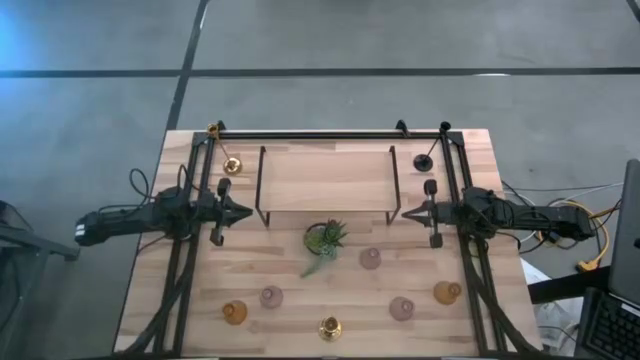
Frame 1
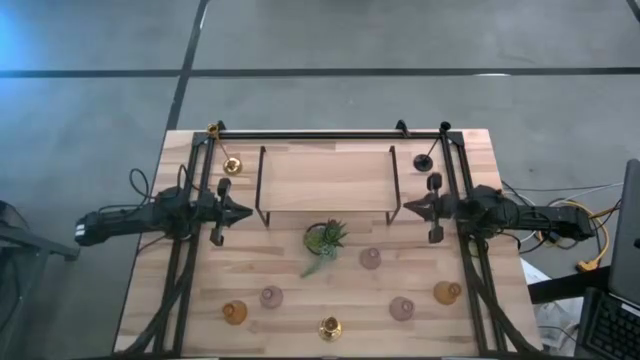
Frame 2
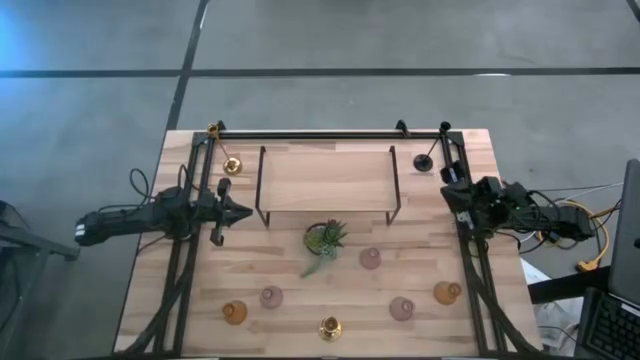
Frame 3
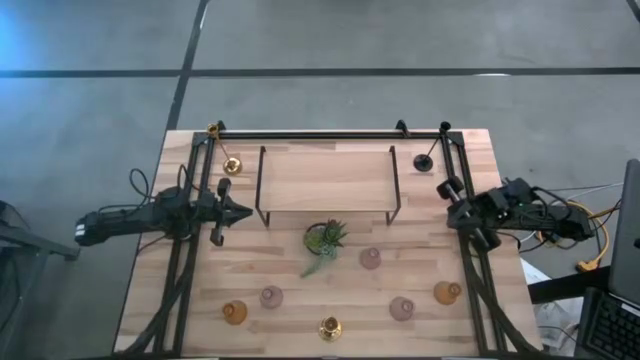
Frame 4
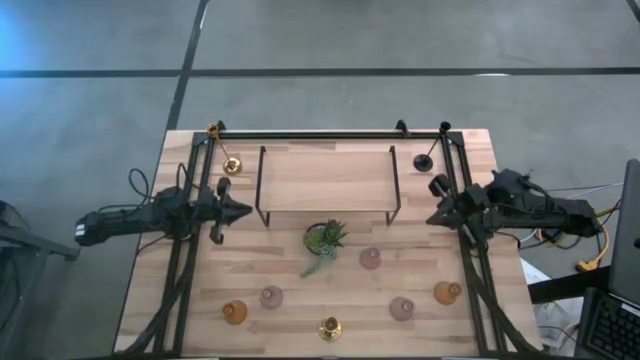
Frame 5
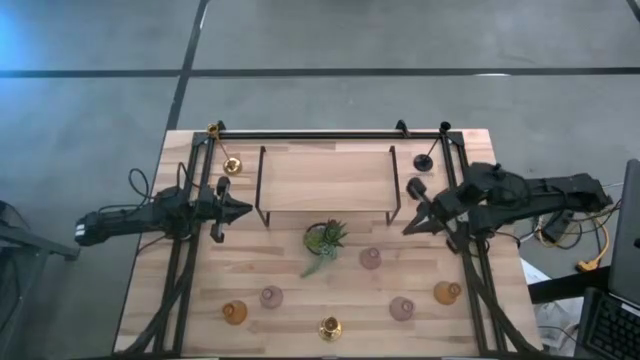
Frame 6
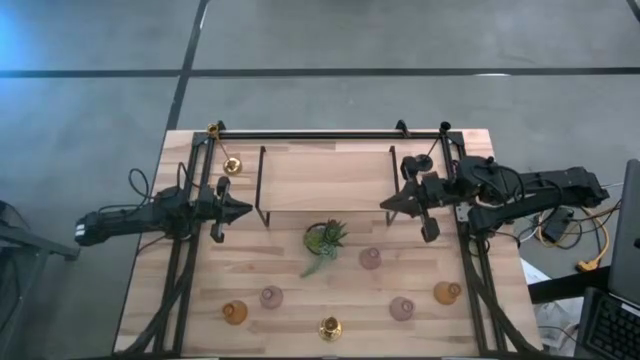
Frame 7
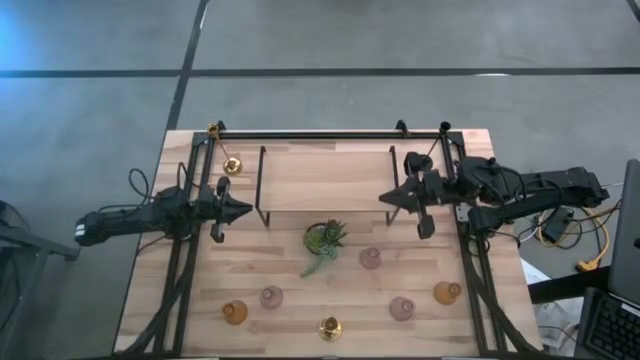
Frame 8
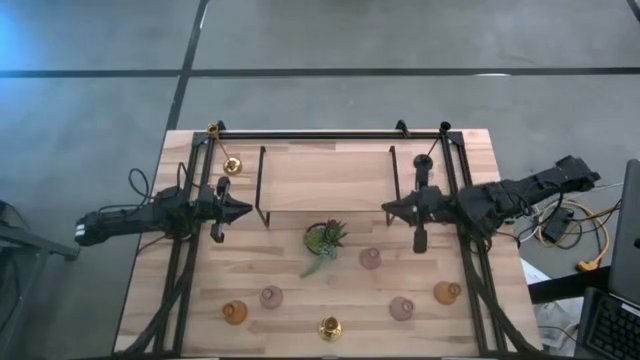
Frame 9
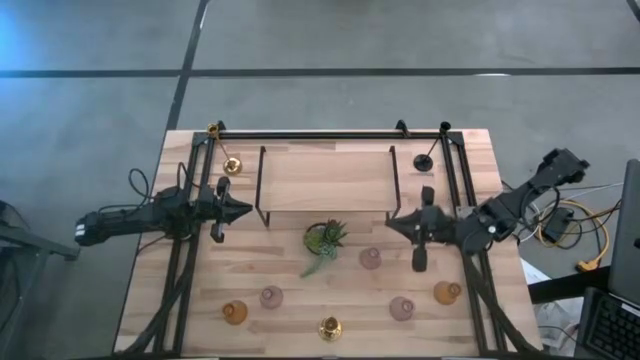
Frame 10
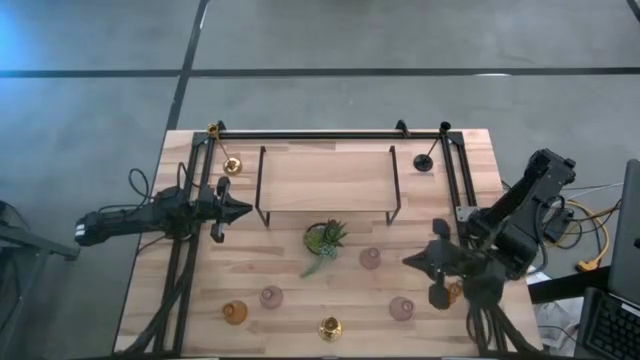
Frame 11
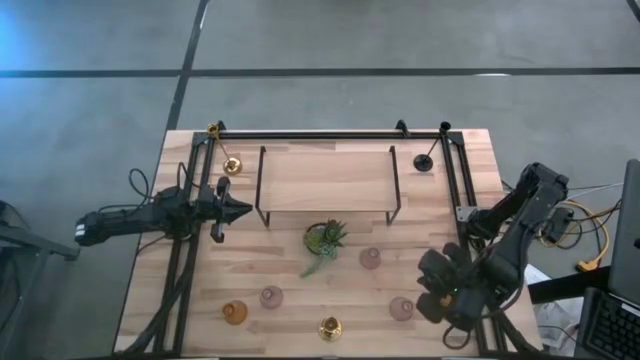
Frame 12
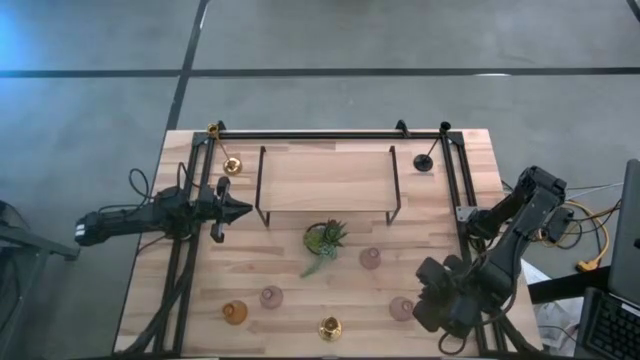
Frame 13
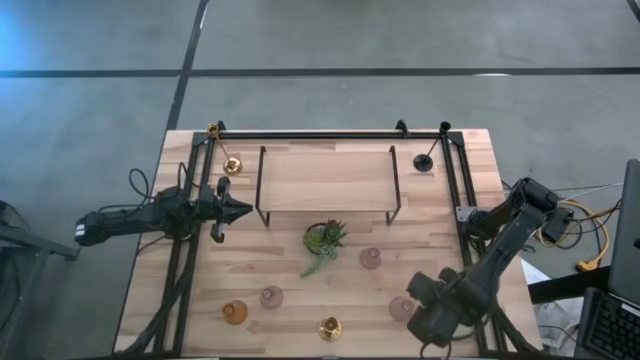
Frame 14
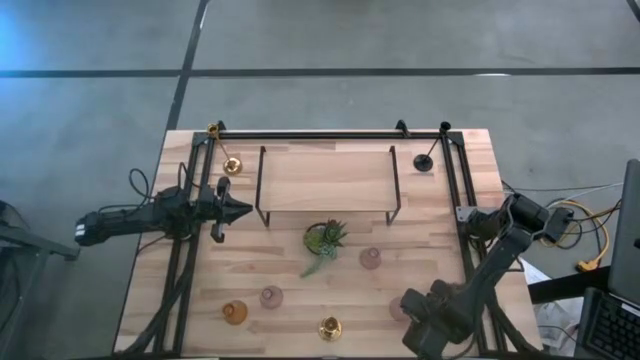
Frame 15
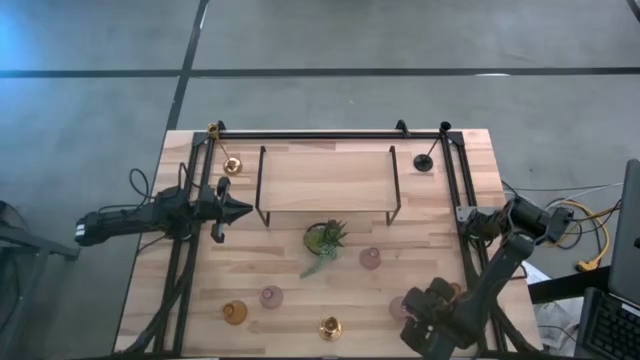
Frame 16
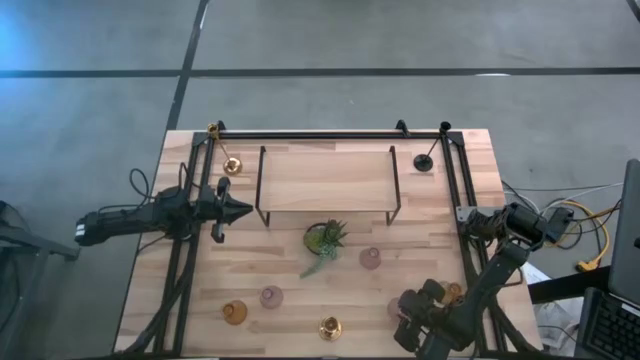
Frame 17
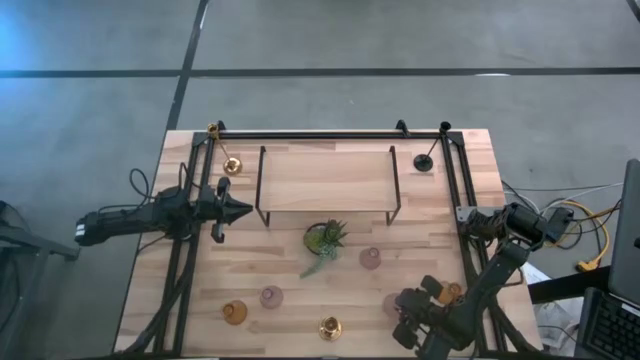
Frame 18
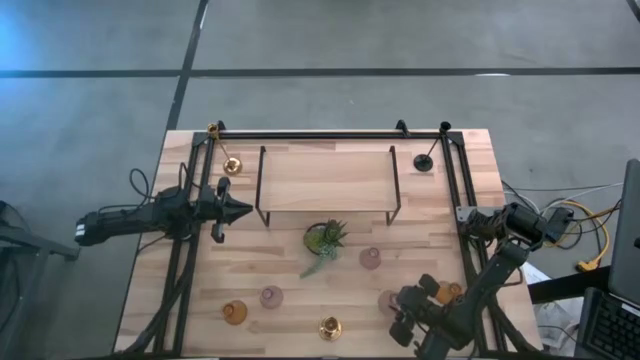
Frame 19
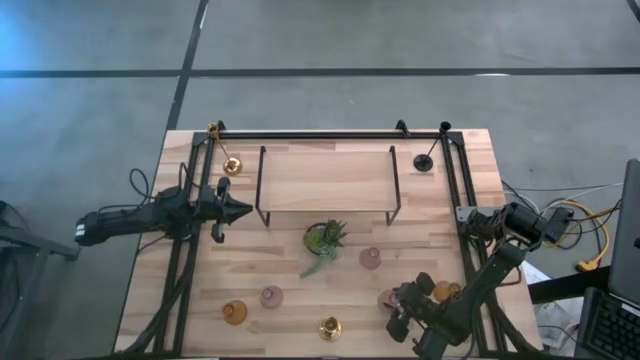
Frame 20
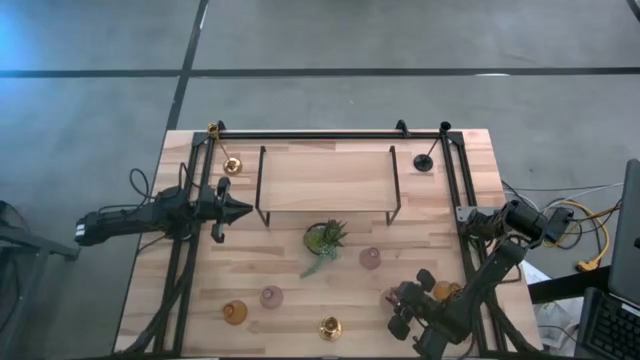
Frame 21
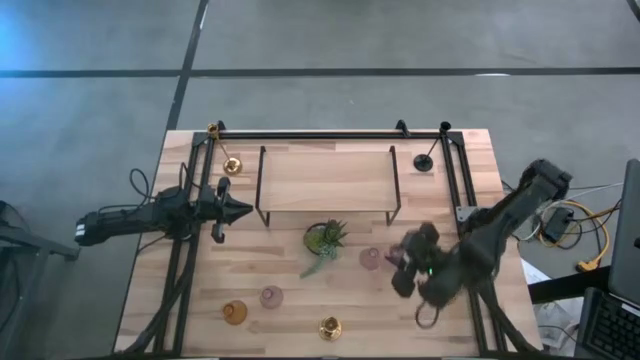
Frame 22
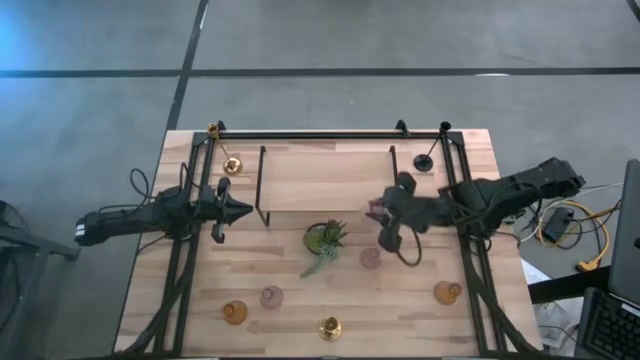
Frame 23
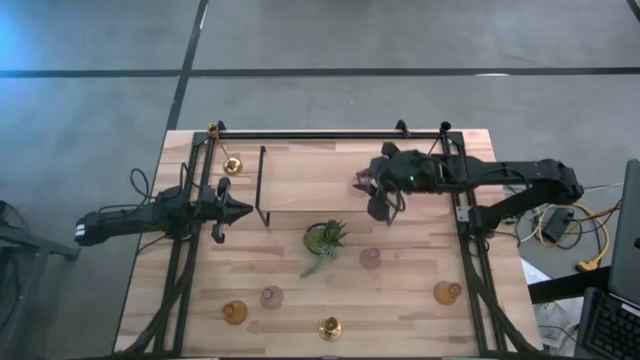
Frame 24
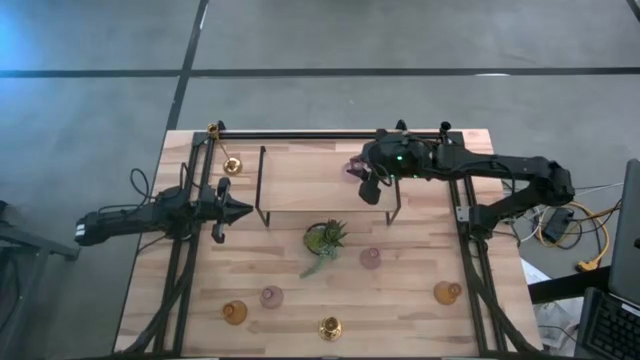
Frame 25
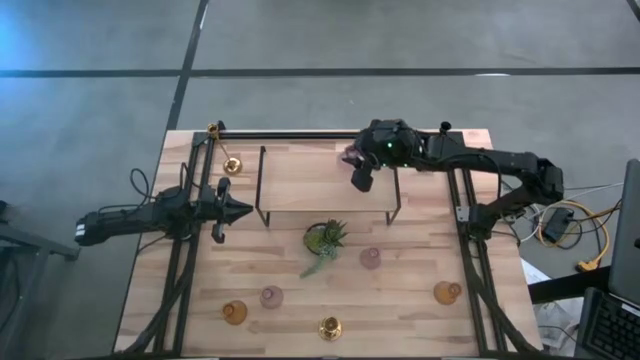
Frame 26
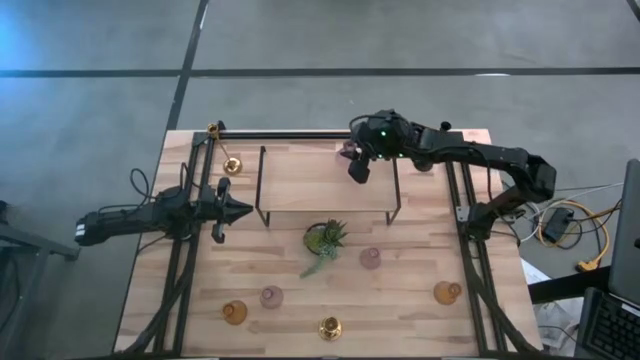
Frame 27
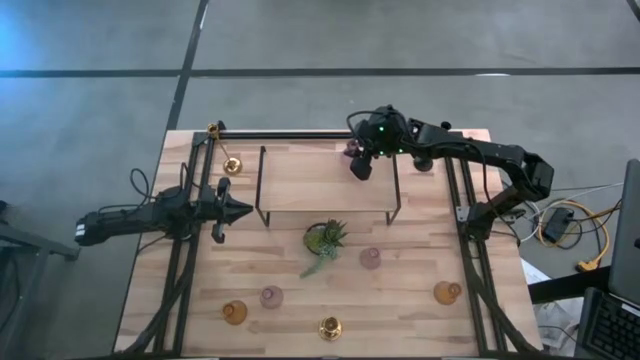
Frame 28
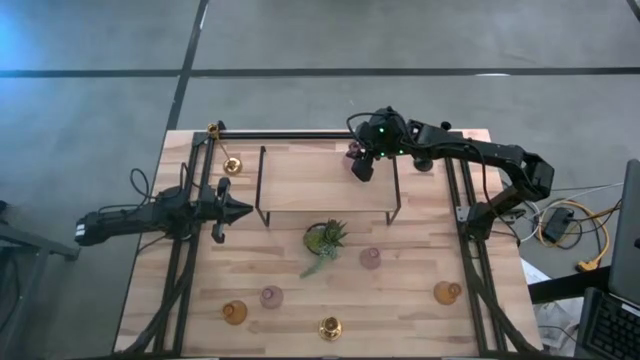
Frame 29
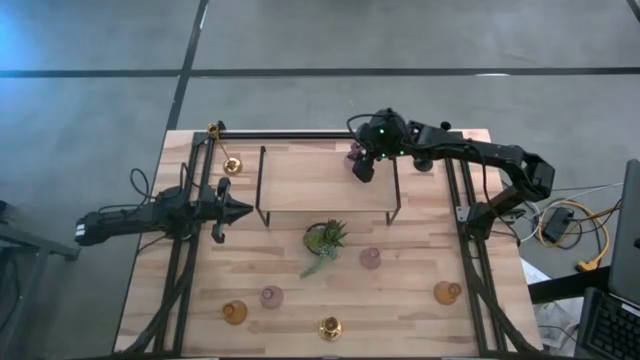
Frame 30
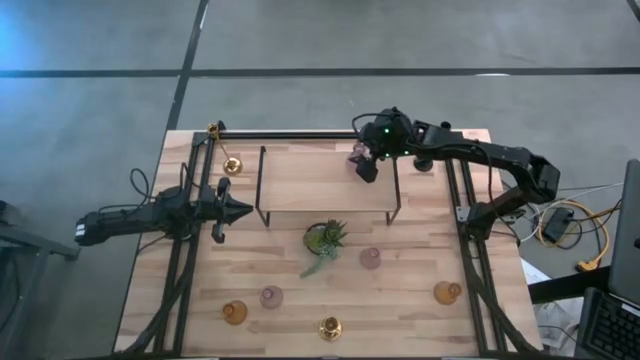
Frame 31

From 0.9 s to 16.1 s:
Task: Pick & Place candle stick holders
Put the right purple glass candle holder on the shelf
